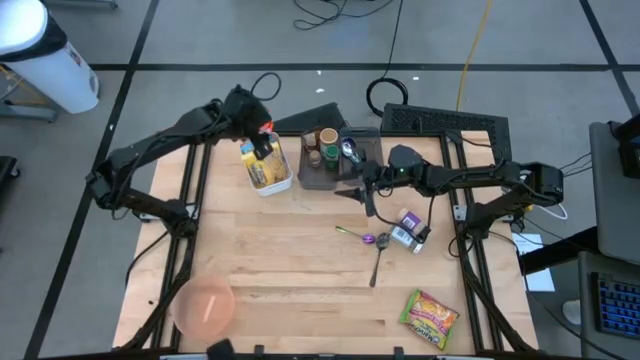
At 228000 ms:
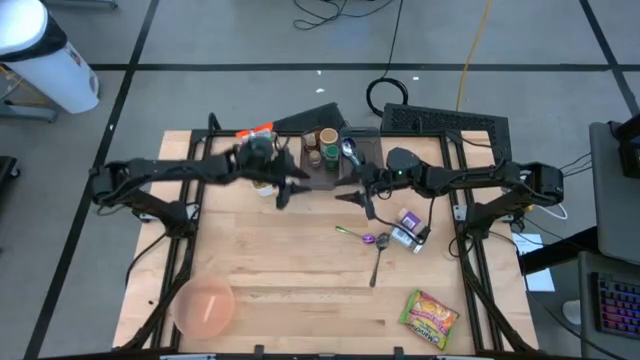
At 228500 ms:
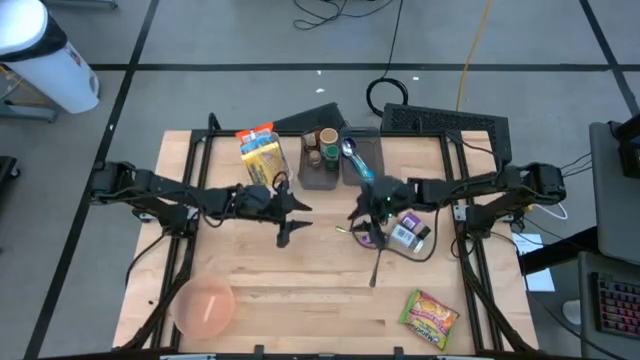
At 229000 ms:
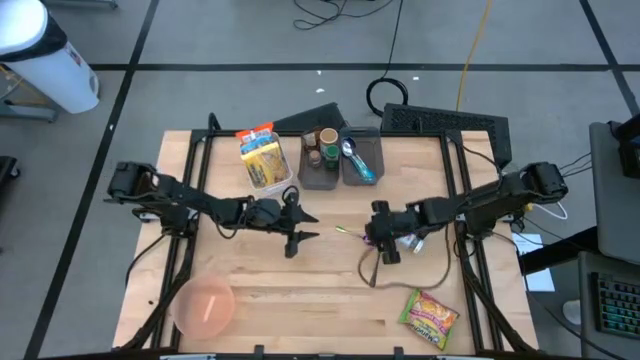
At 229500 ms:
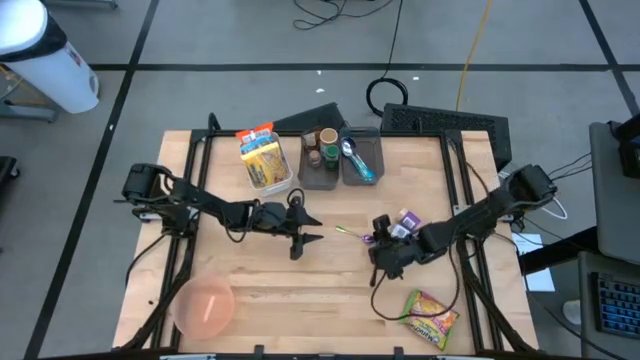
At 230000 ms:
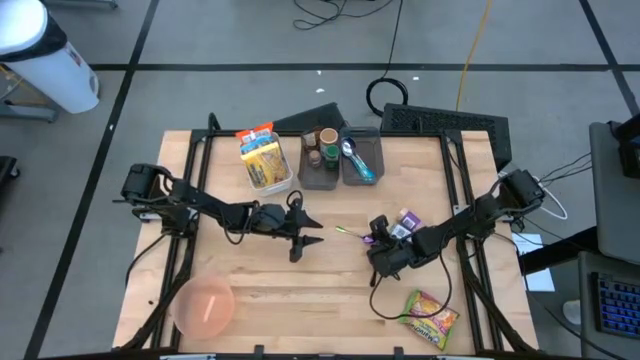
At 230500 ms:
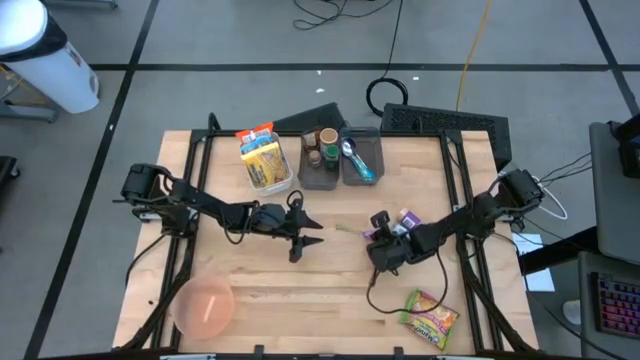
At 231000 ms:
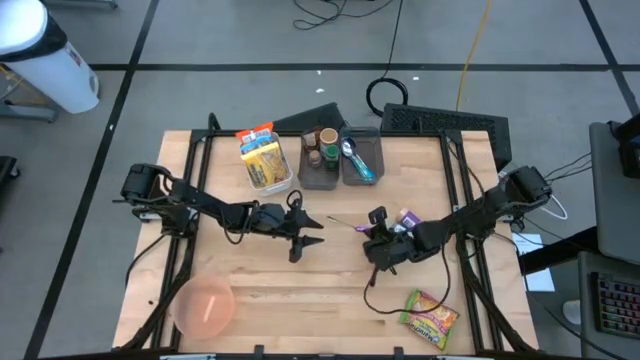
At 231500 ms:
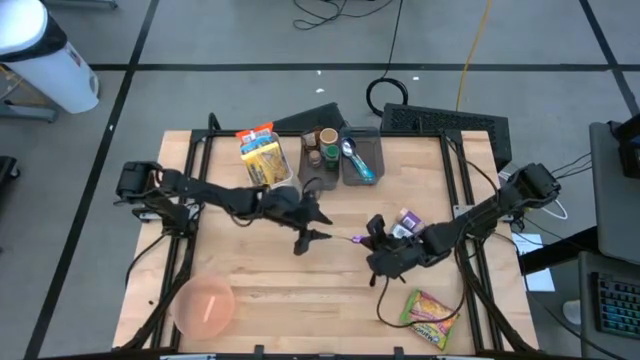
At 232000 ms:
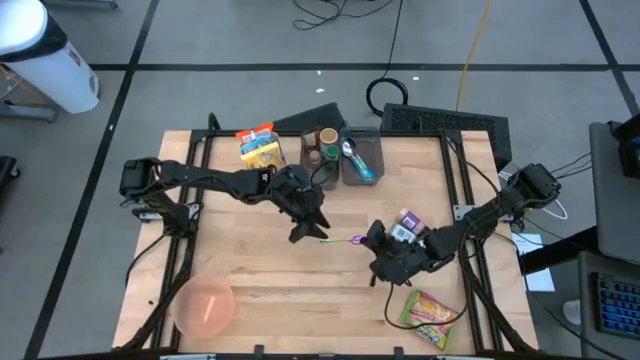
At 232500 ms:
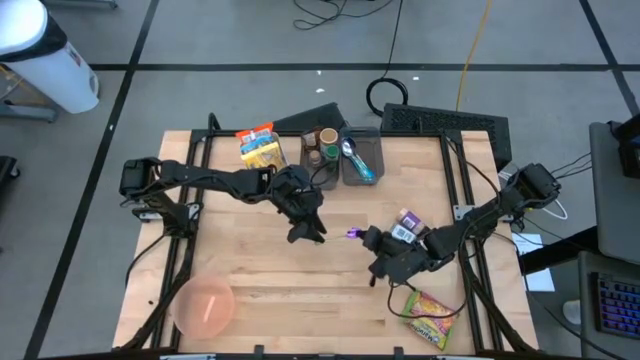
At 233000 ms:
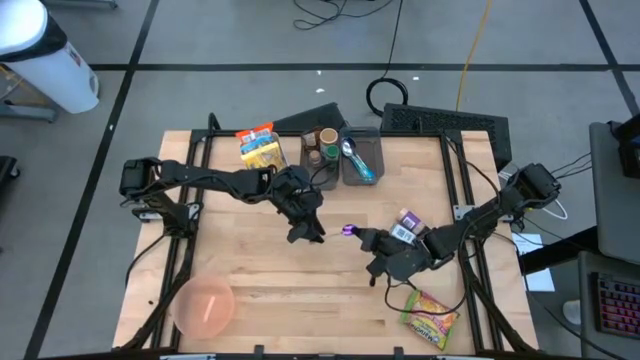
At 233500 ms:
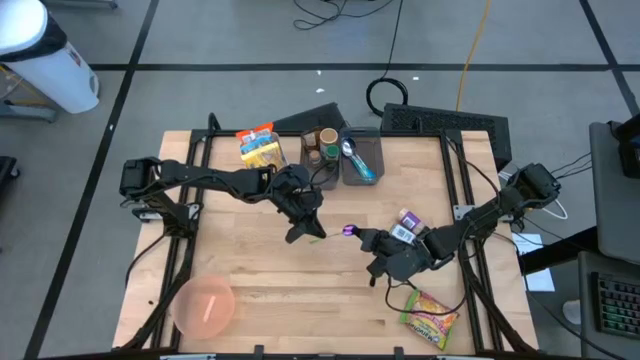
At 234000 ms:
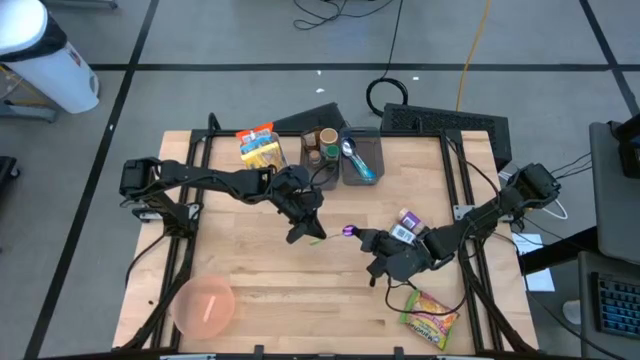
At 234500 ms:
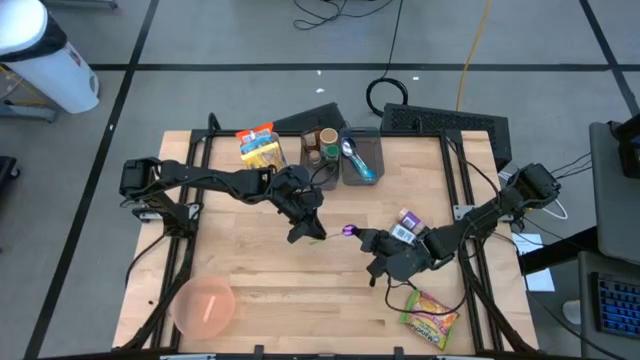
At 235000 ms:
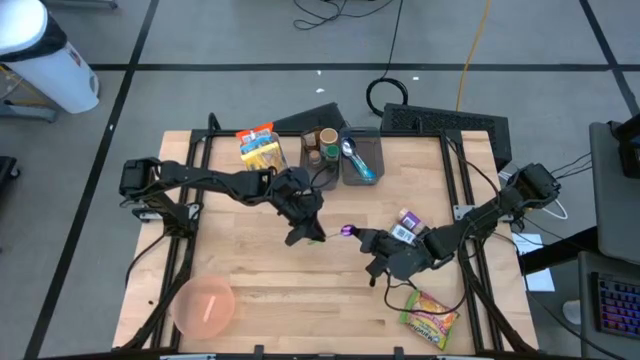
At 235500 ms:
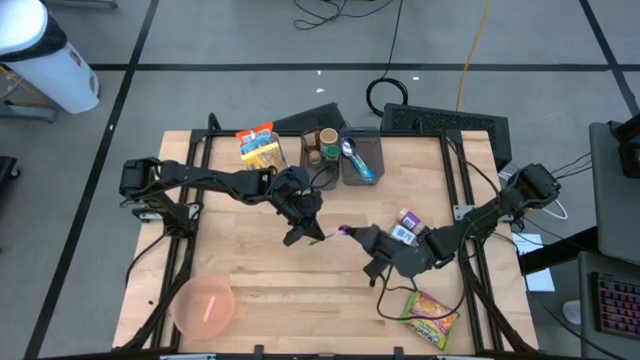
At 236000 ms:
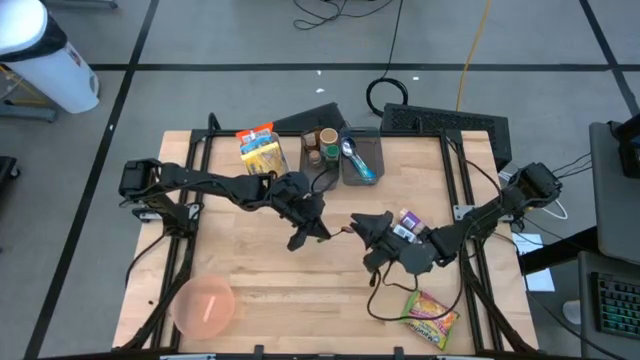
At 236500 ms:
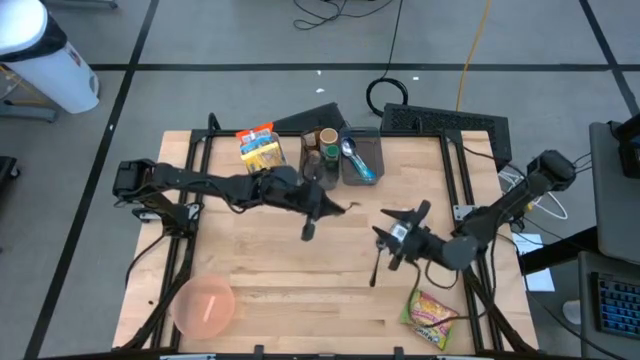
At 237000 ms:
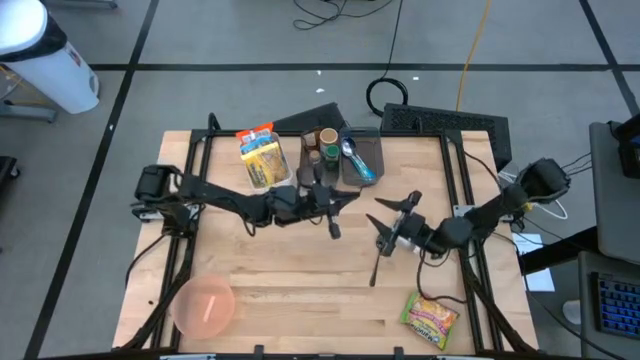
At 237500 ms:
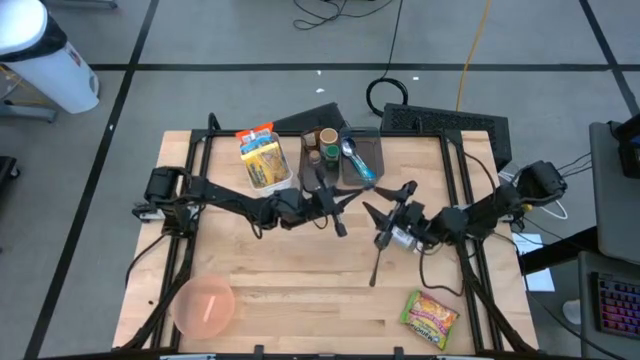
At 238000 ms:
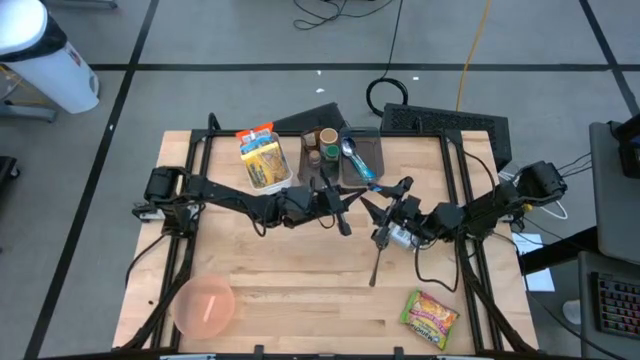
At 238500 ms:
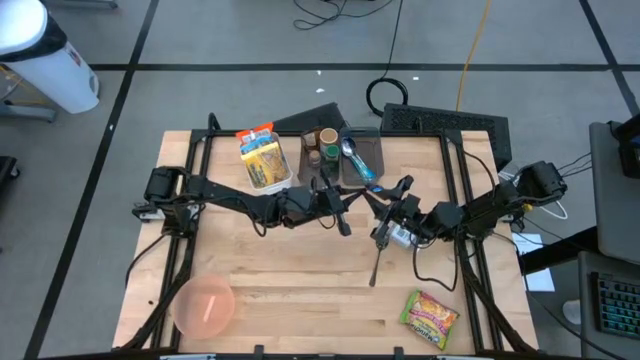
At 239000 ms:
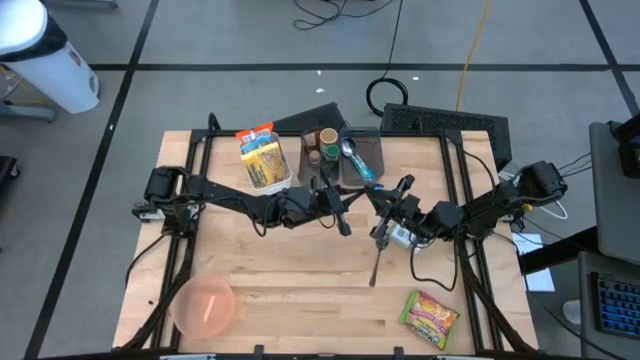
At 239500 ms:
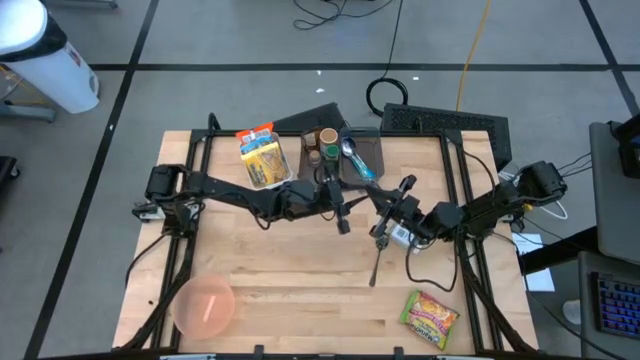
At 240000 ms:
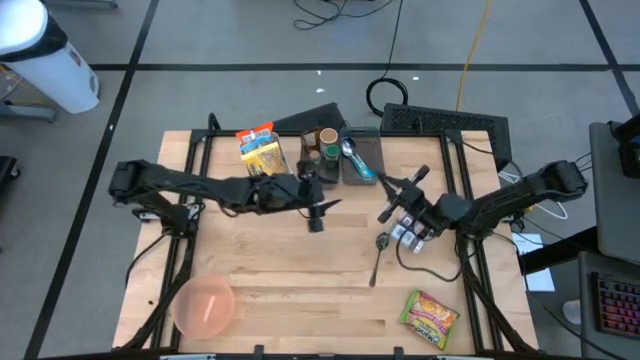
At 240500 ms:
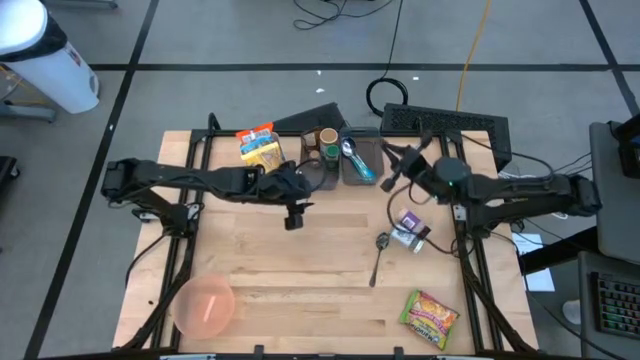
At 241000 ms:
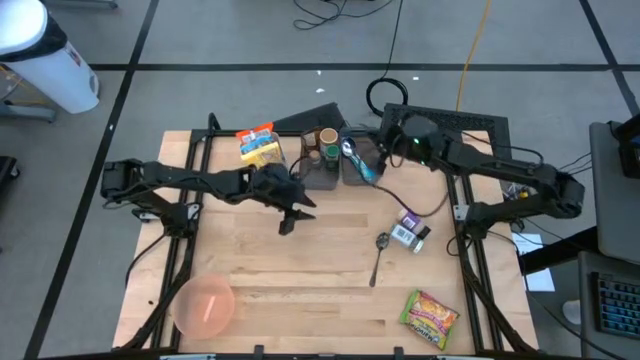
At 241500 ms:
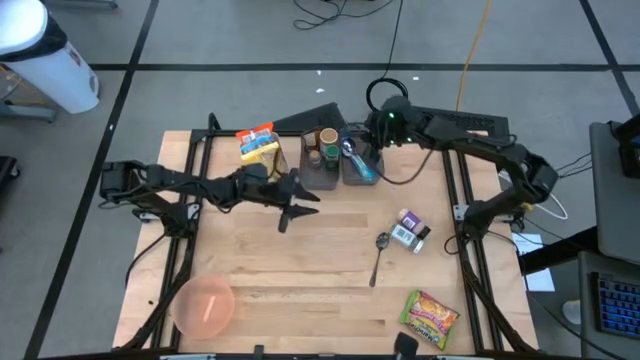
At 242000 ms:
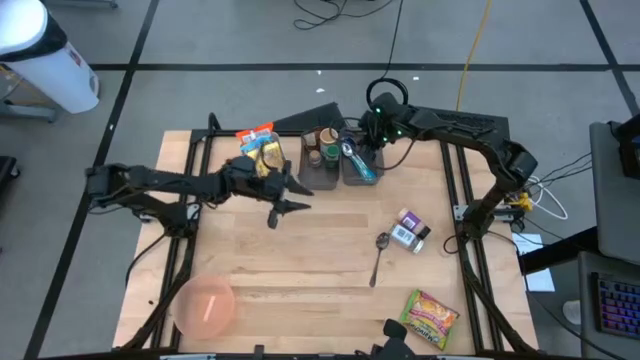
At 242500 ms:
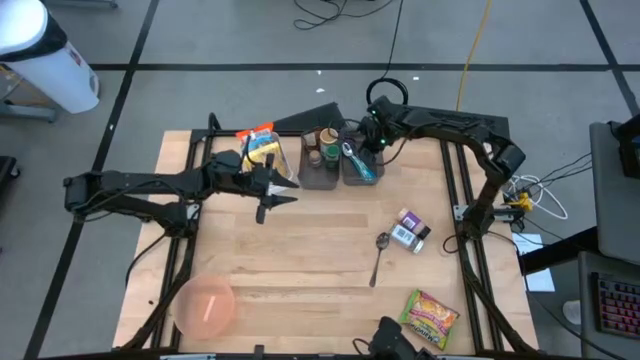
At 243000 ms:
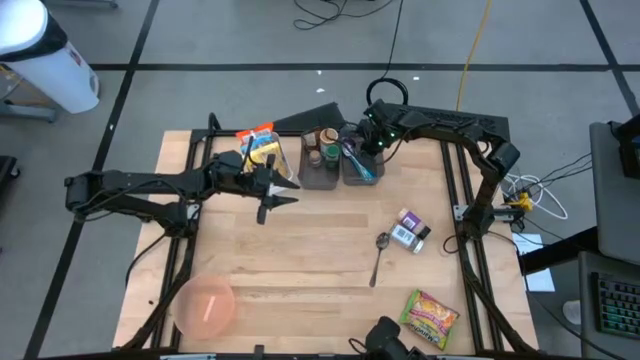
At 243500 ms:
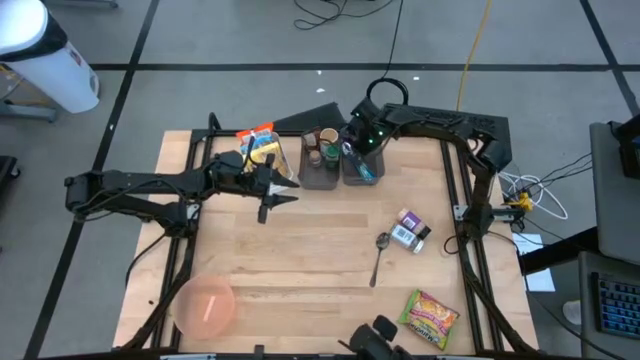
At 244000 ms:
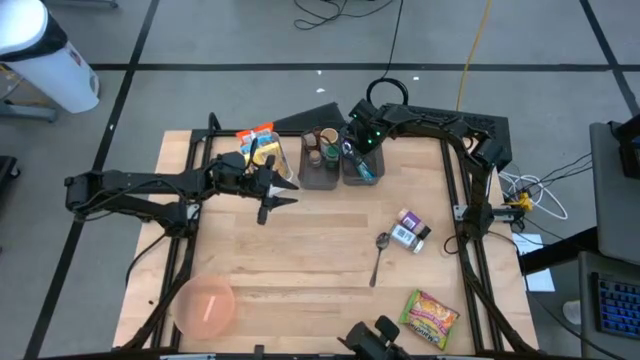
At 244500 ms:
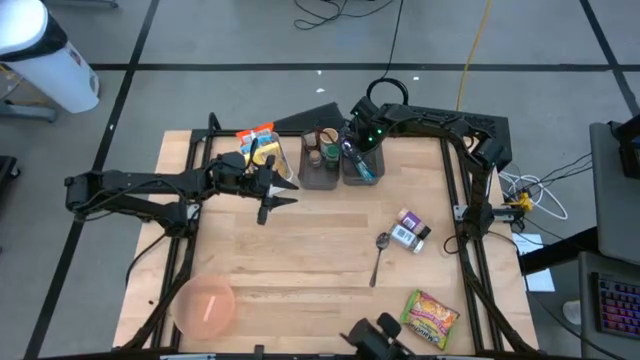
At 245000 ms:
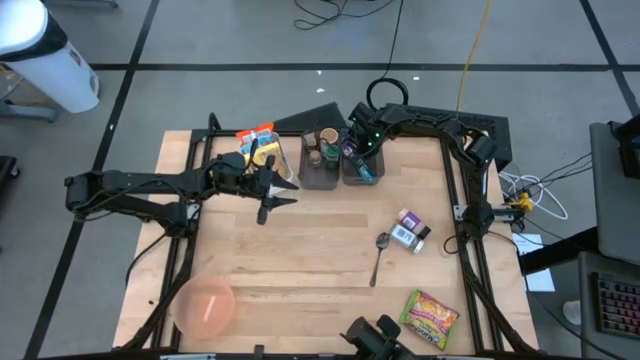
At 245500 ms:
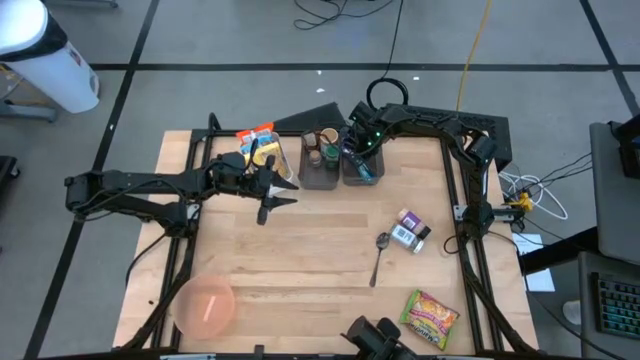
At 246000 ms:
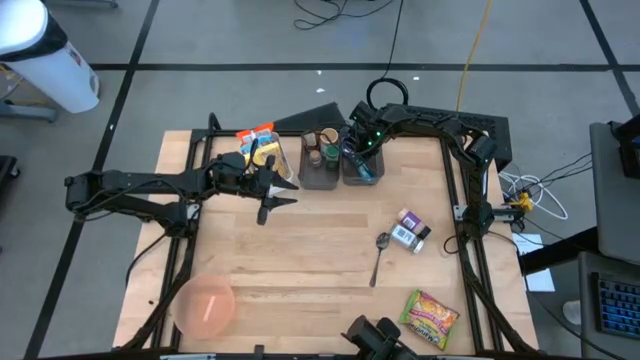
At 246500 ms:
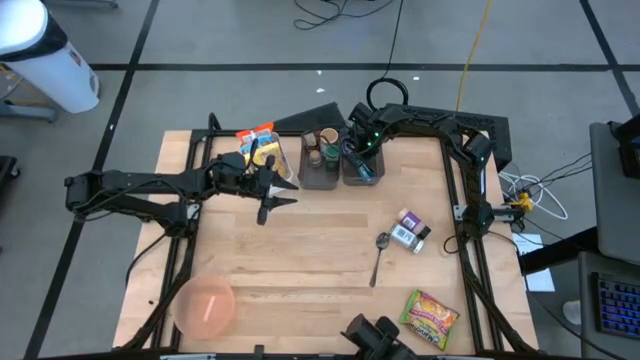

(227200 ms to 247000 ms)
Task: Pick & Place Food Item
Put the purple spoon into the right black bin

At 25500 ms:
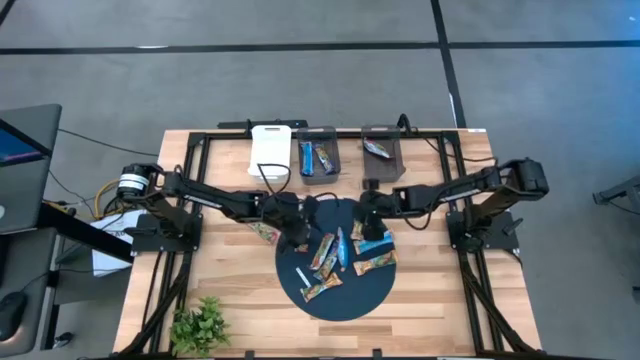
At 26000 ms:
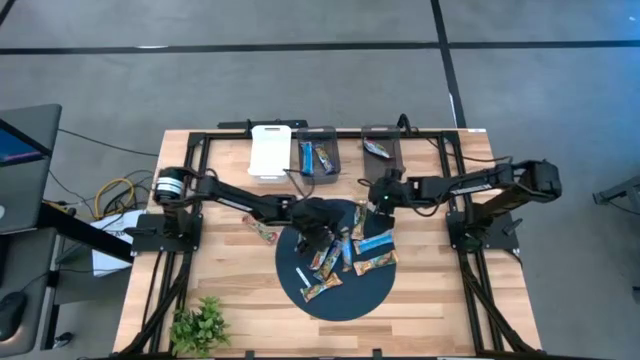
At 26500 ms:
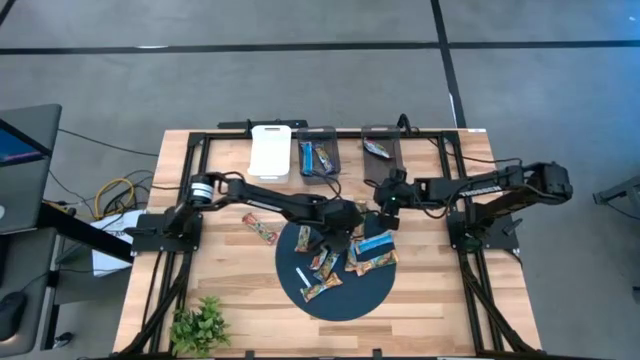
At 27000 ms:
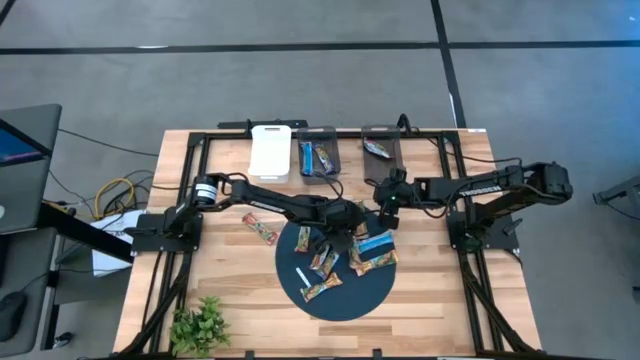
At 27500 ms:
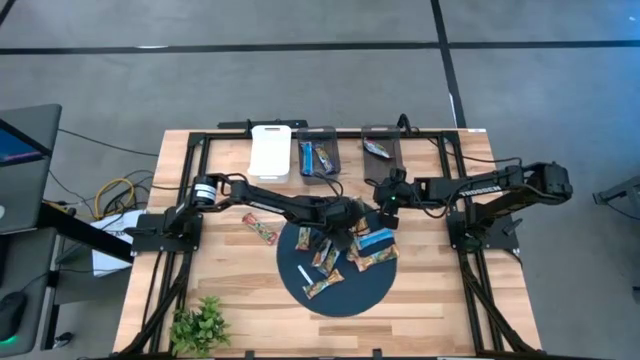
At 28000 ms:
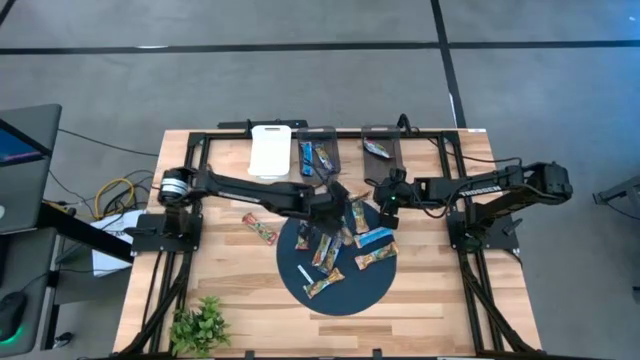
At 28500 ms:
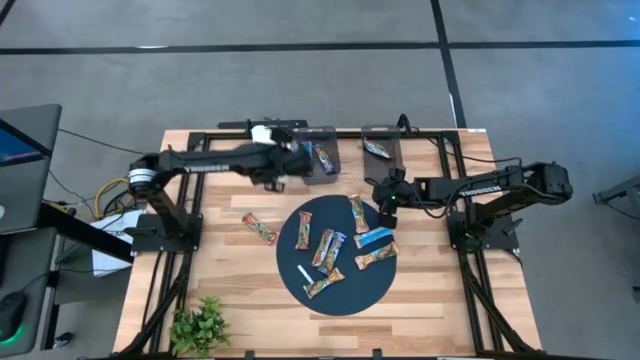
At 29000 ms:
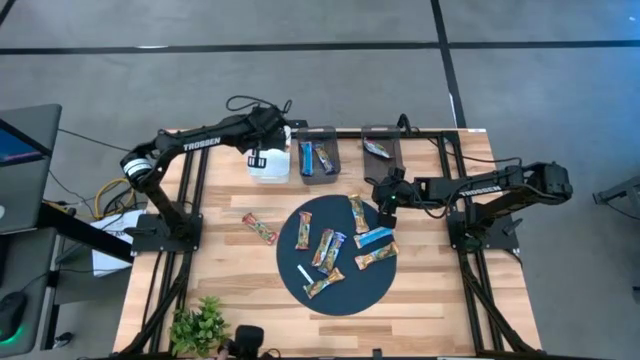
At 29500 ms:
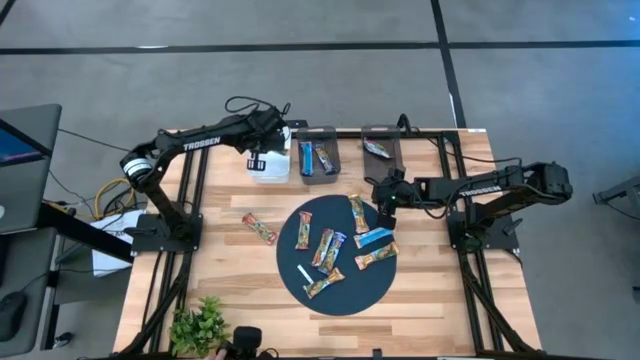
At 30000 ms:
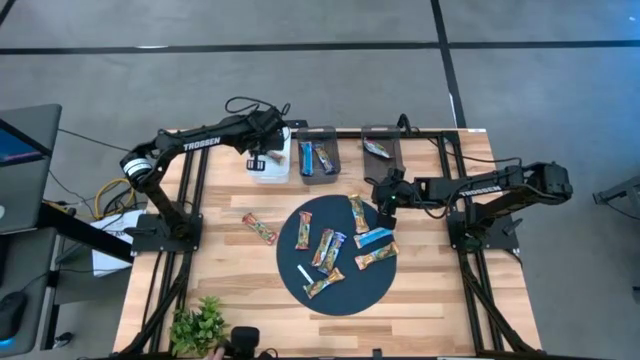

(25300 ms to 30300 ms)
Task: Pick and place Granola Bars by type
Put the orange granola bar into the white bin
